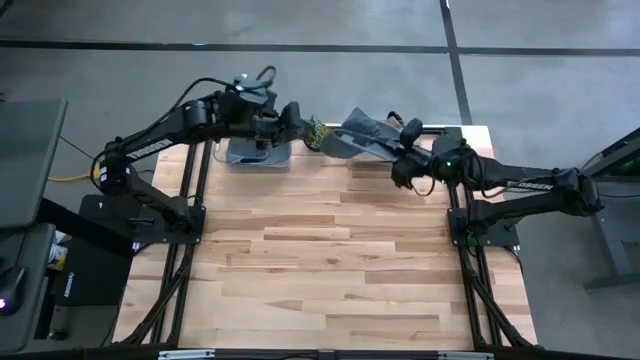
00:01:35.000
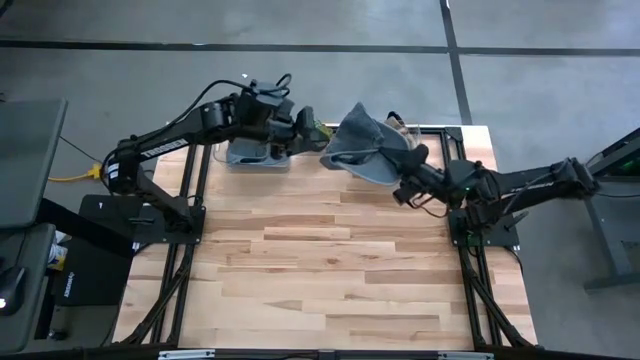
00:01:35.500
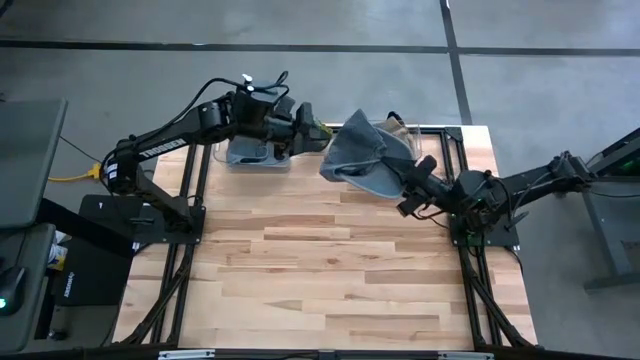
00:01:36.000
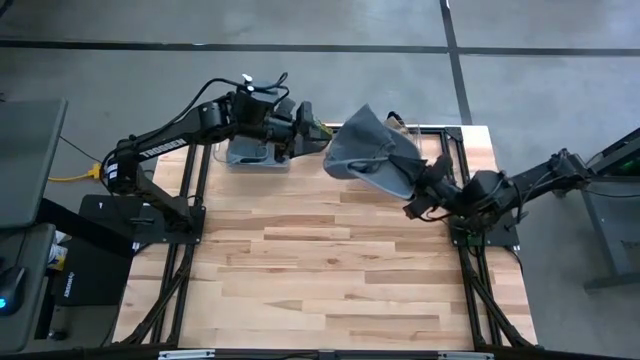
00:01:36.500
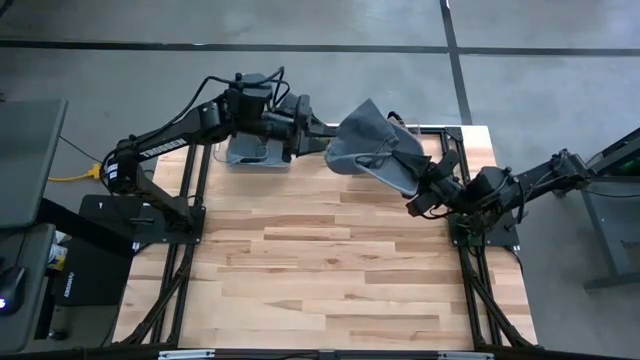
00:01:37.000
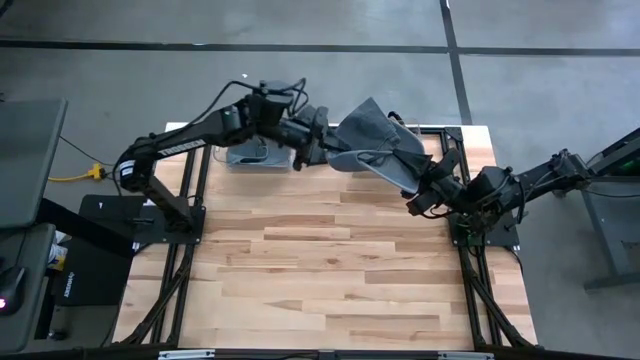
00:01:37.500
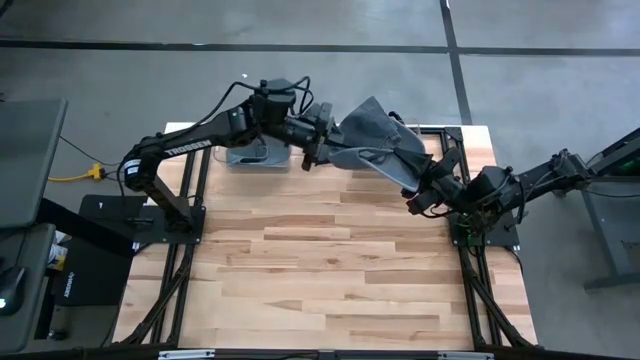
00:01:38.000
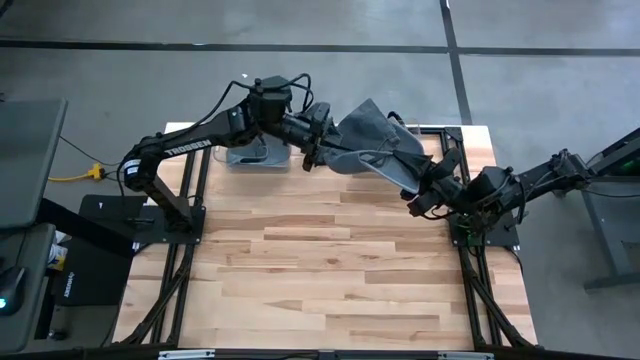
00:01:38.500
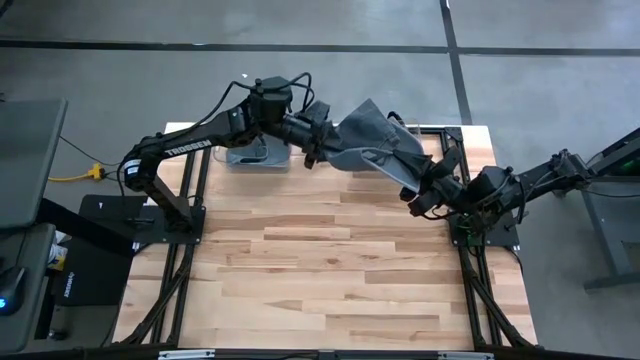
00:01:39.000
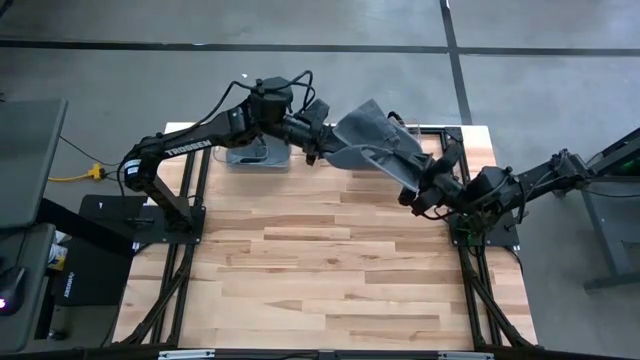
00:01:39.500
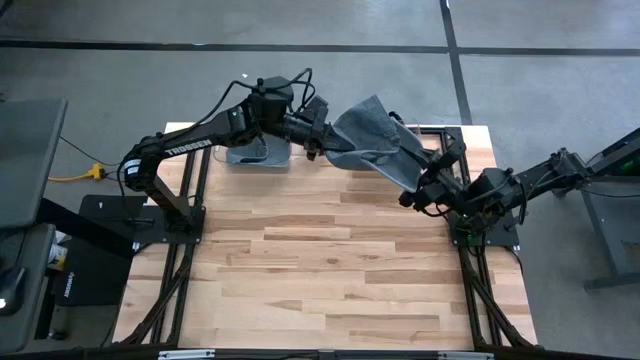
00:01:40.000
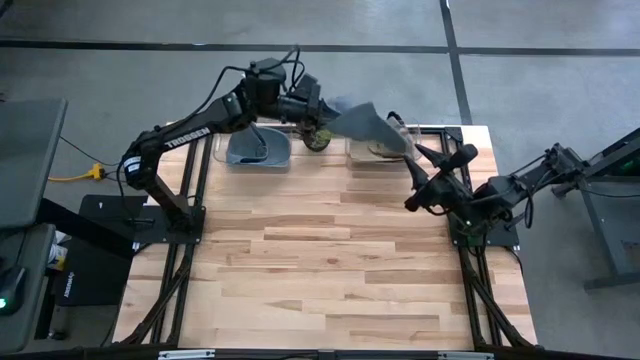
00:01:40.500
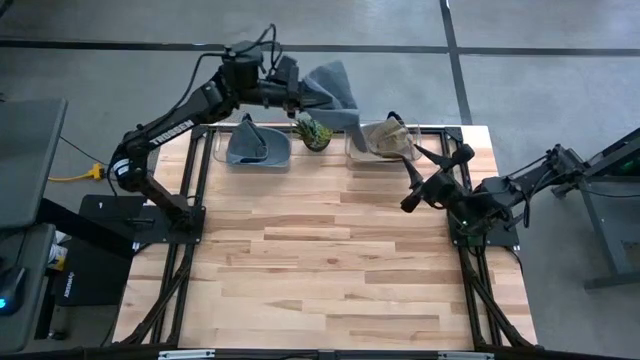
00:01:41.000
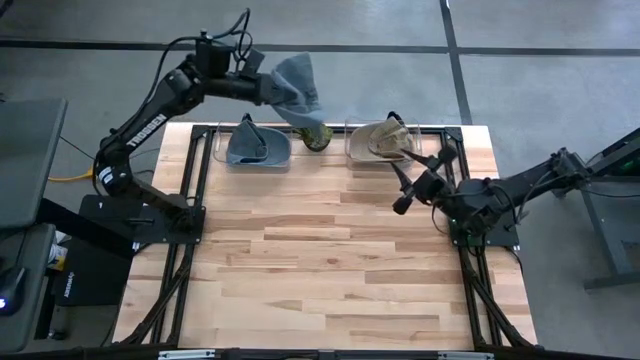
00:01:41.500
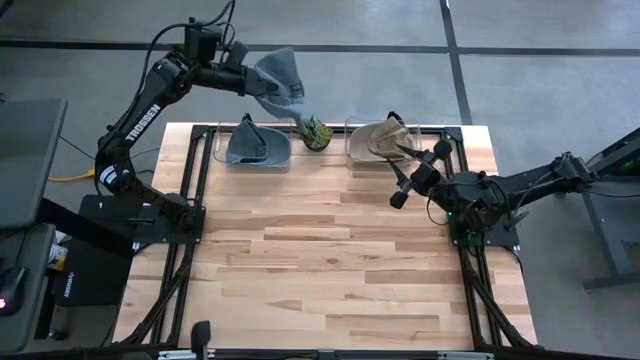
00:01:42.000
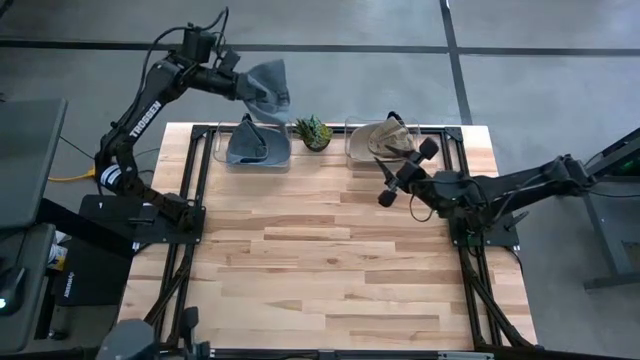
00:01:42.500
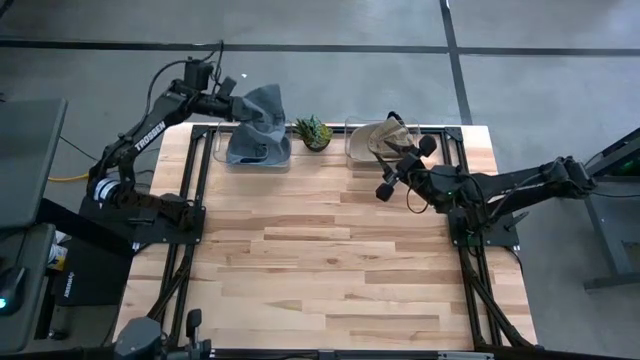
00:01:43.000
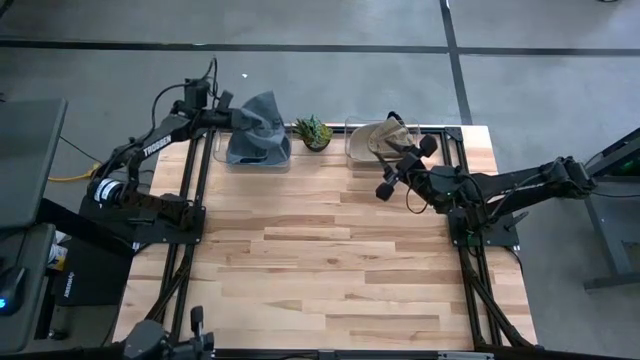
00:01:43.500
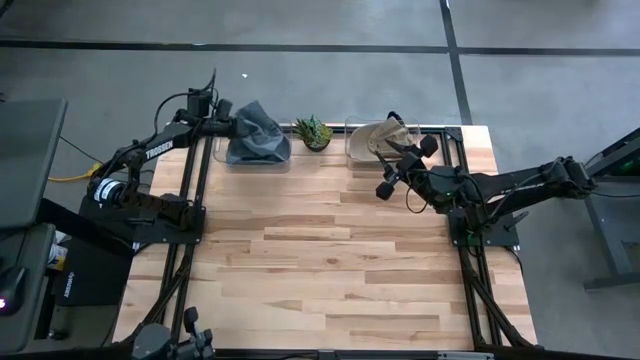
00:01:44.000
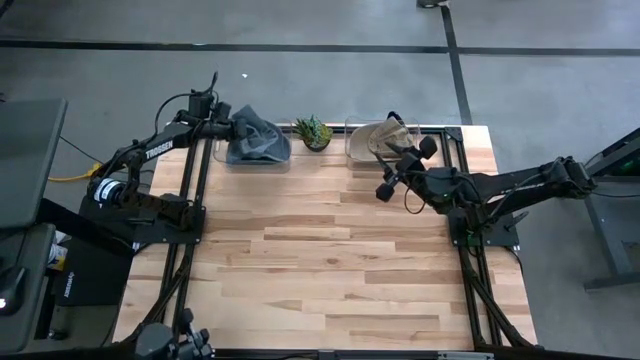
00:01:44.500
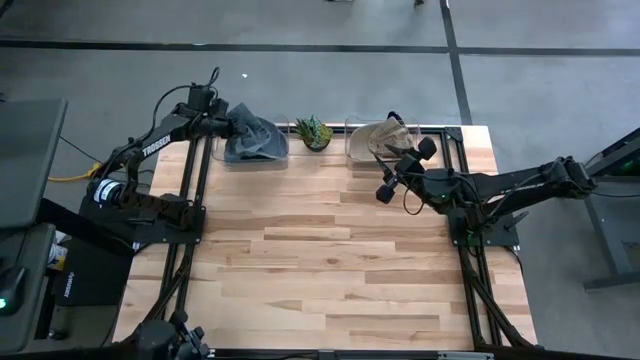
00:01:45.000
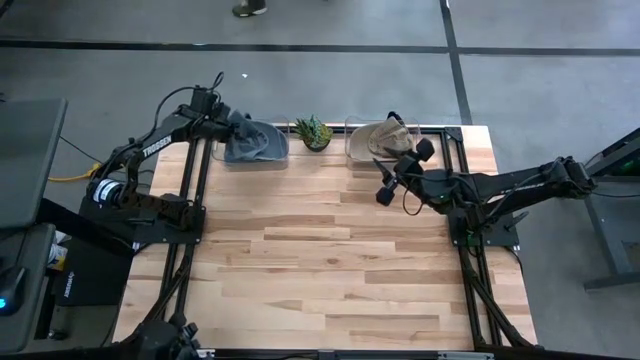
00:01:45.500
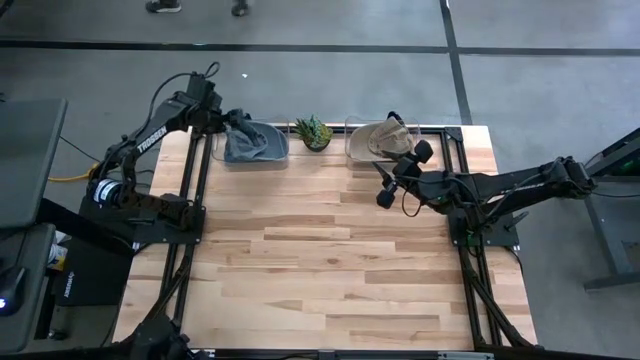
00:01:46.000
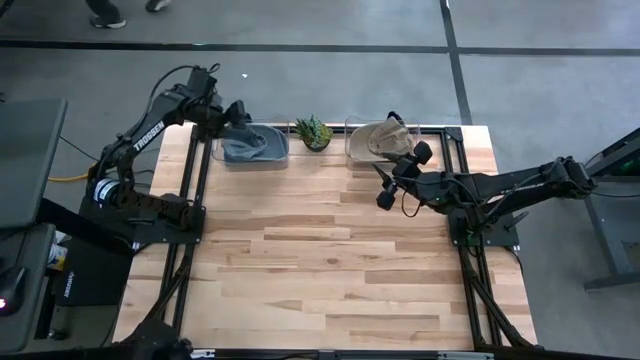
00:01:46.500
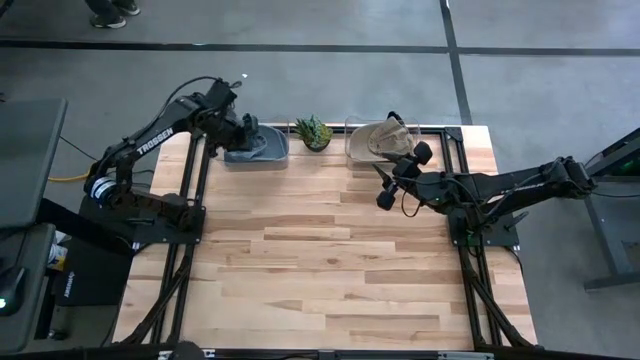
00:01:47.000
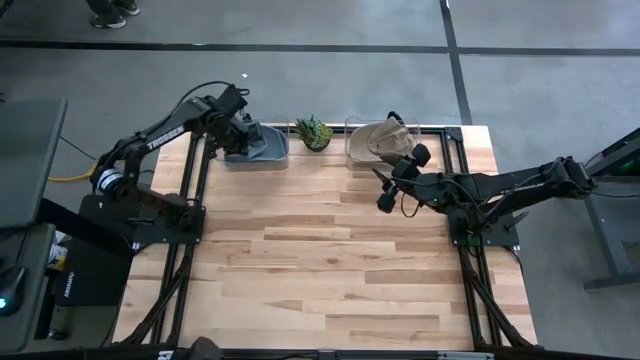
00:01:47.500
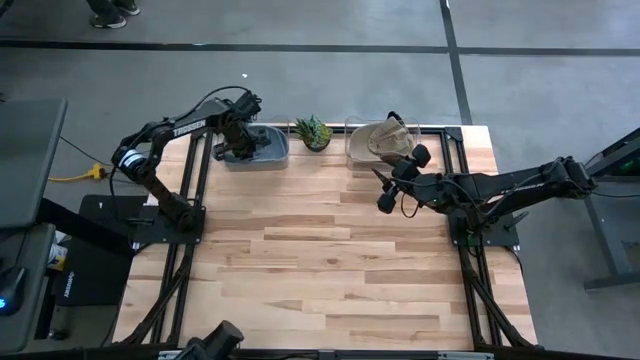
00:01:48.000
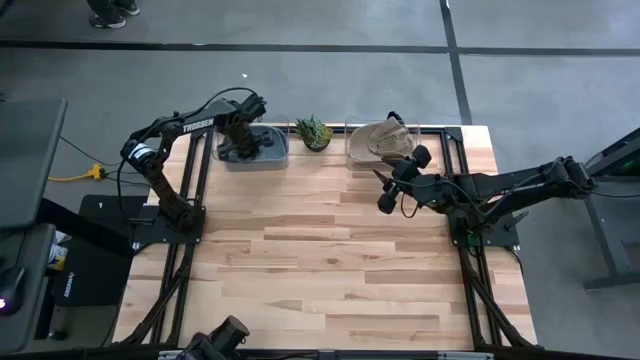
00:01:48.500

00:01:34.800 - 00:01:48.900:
Task: Pick & Place hat
Put the gray cap into the left transparent bin

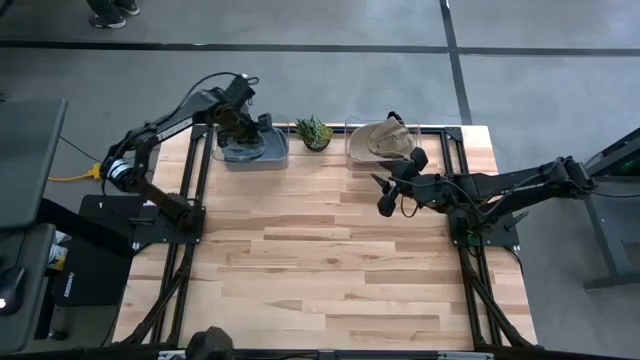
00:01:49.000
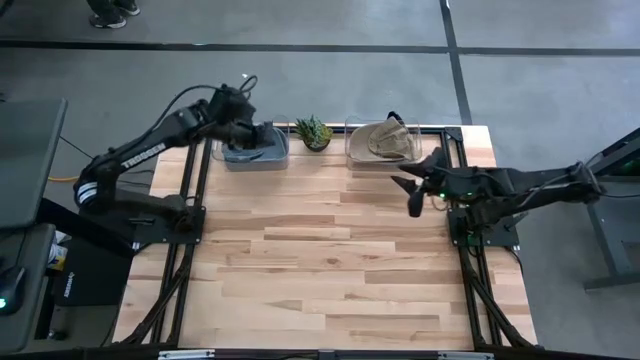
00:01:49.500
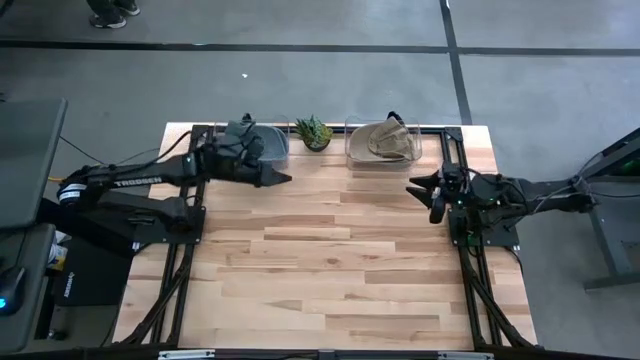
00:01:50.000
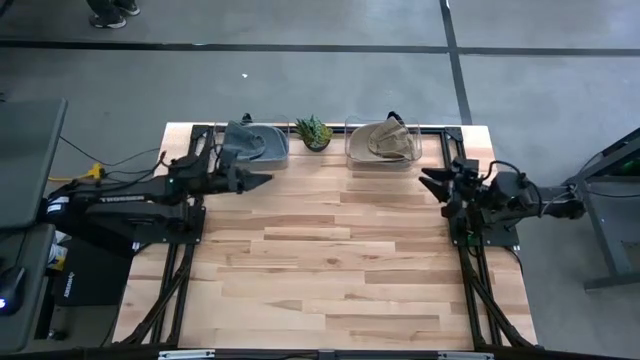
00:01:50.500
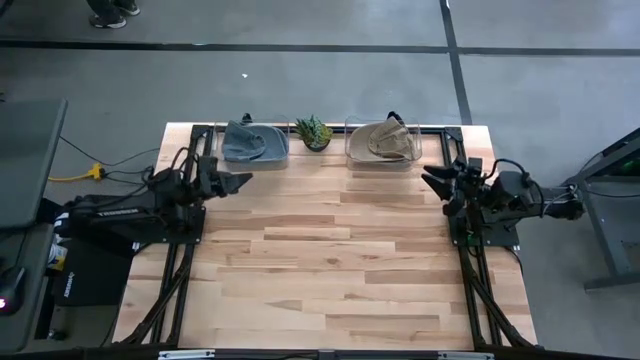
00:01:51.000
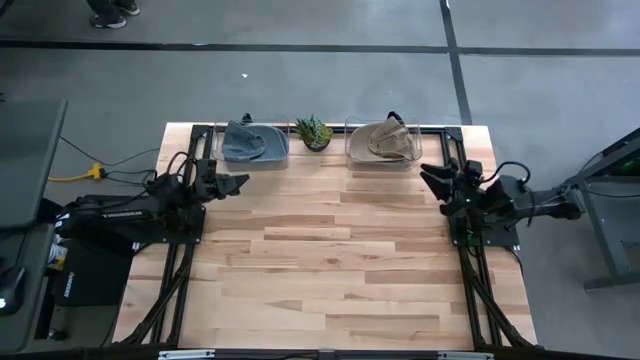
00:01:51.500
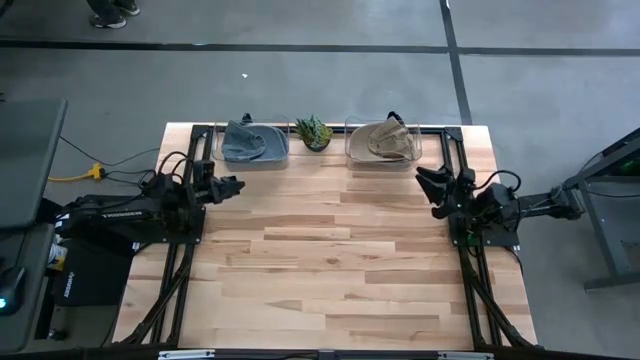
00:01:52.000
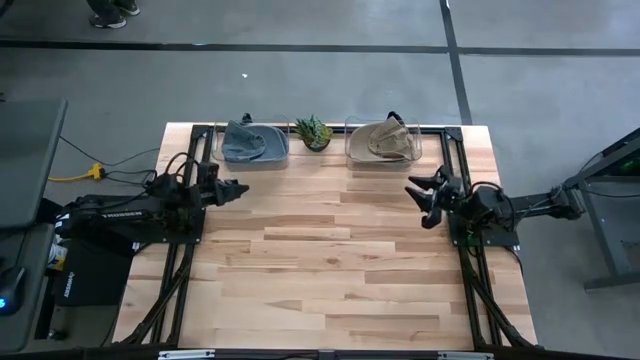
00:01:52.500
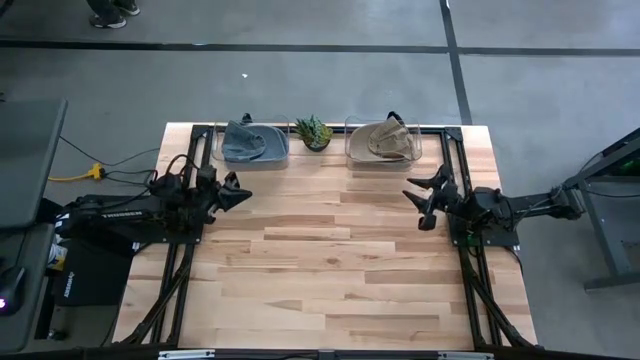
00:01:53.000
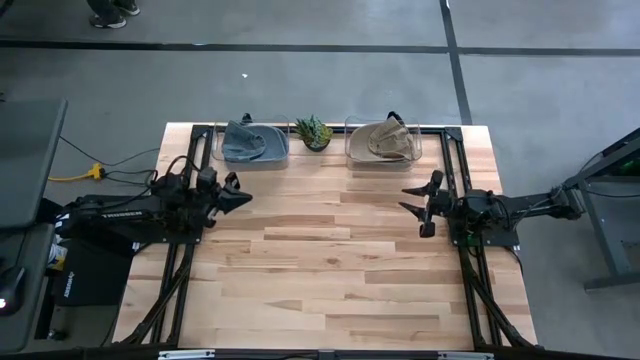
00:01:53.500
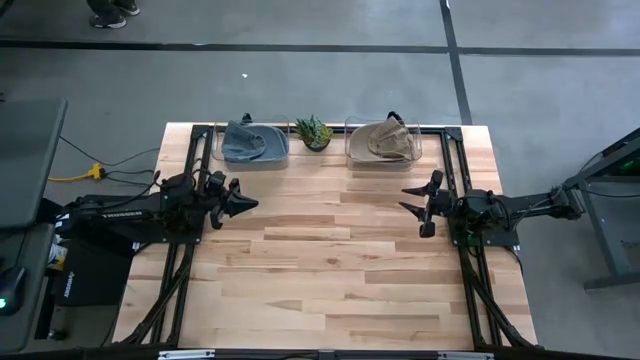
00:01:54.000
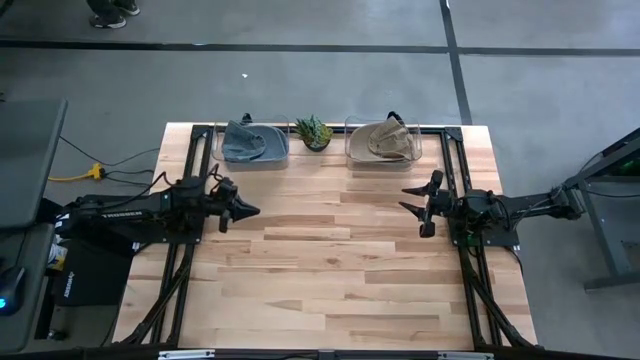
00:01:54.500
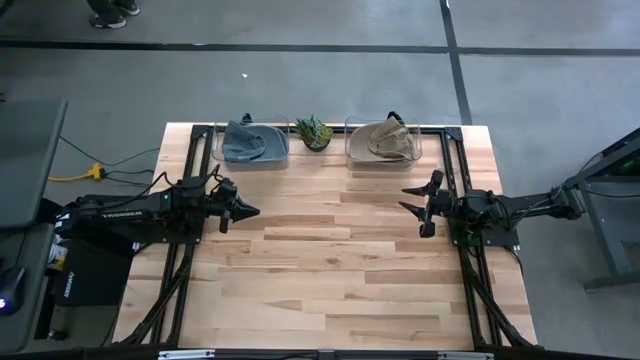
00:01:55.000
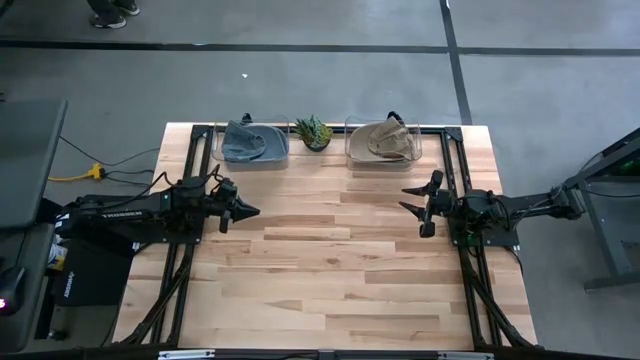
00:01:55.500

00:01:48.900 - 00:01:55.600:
Return to Home Position

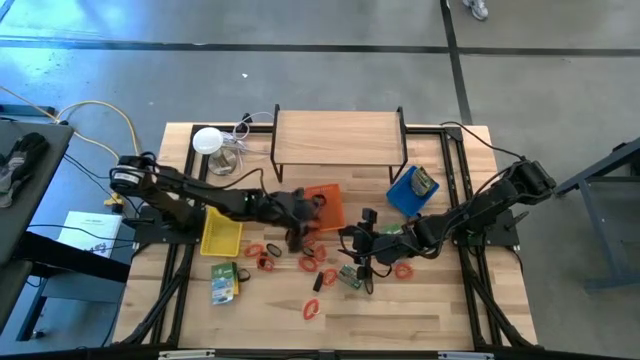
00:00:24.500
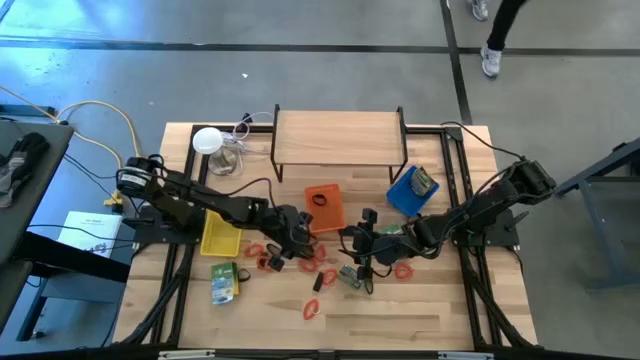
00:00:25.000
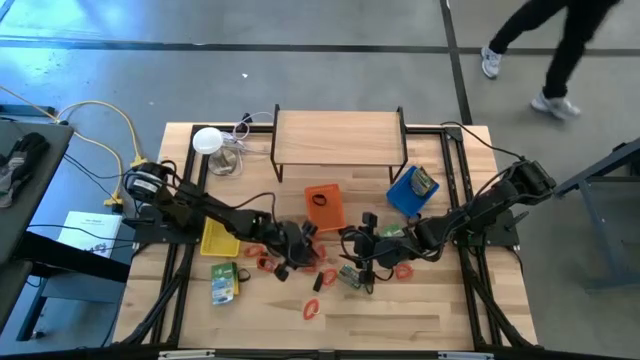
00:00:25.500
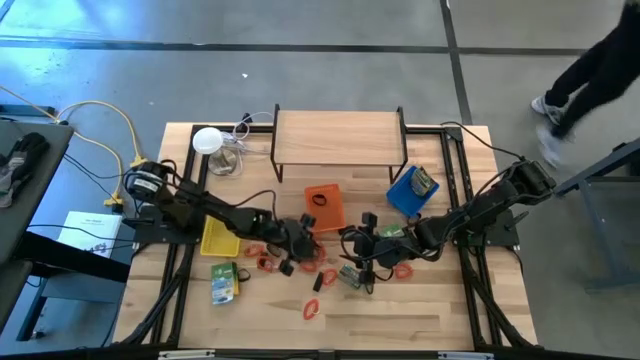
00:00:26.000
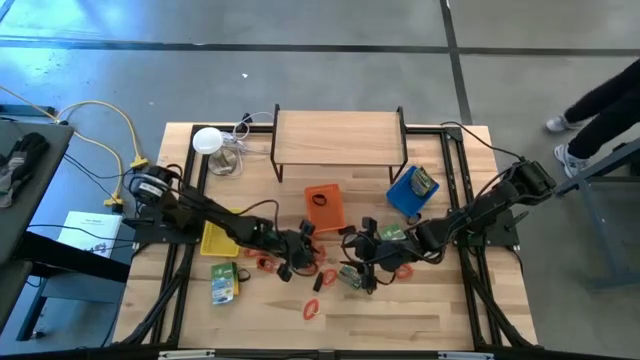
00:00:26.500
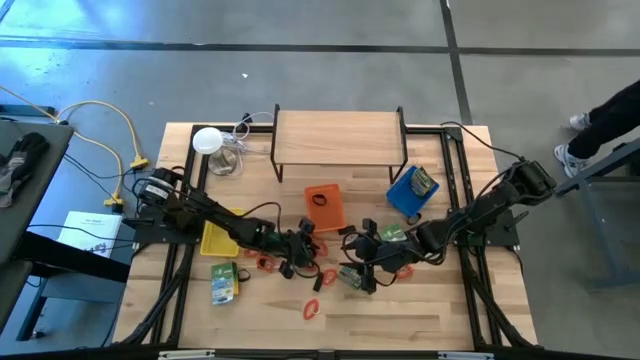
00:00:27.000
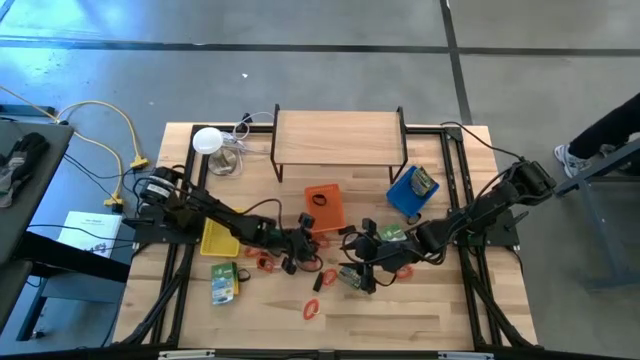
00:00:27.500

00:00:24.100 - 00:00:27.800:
Task: Pick & Place Office Desk Supplies
Put the orange spring key chain into the yellow bin
